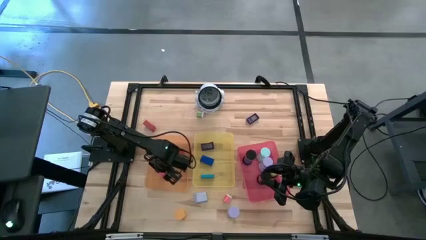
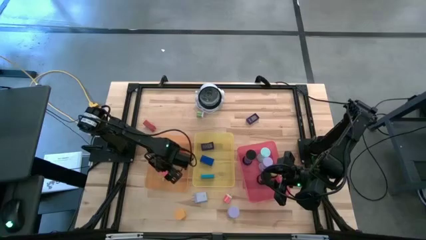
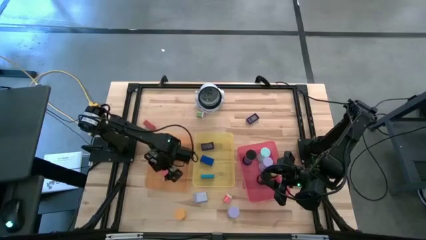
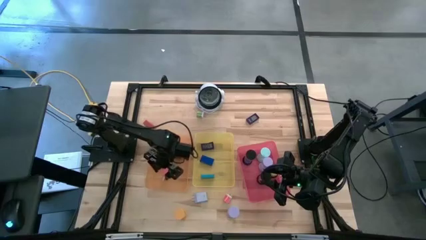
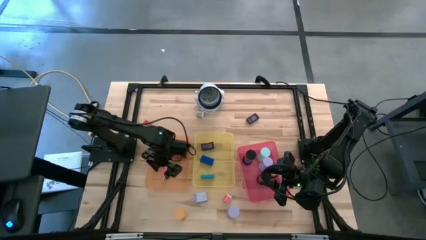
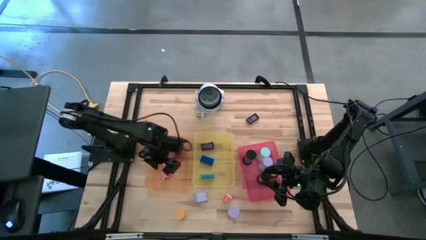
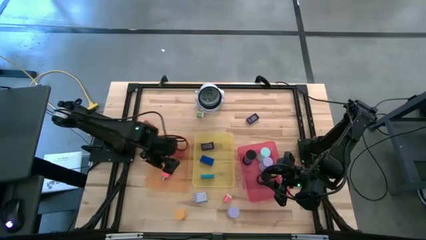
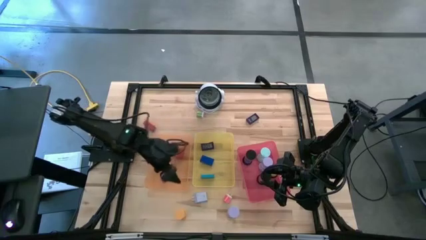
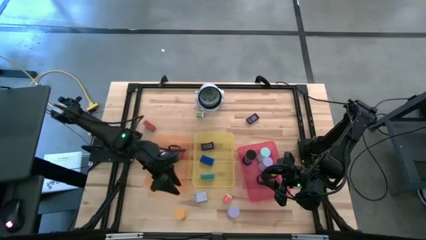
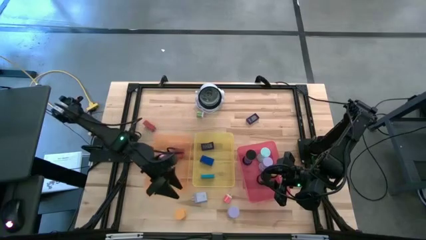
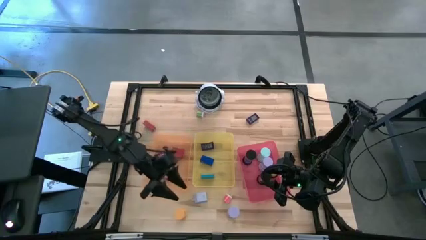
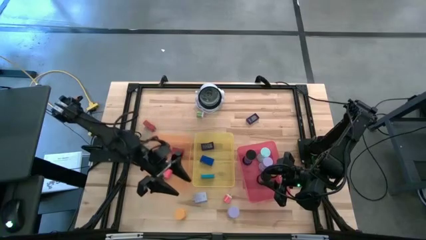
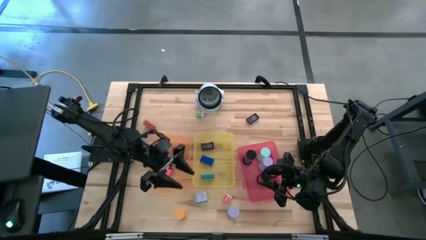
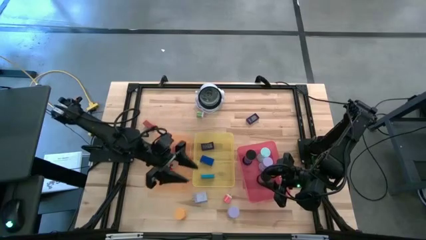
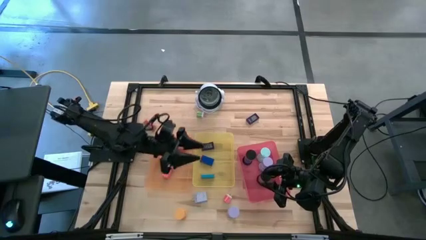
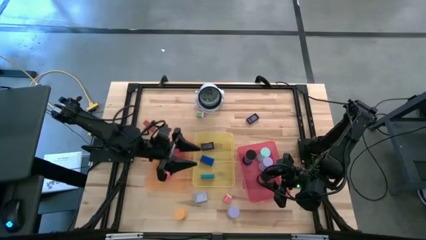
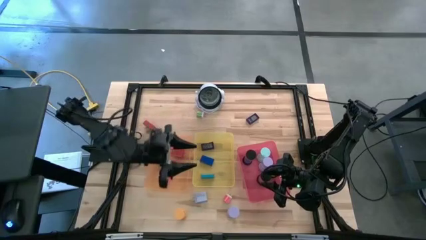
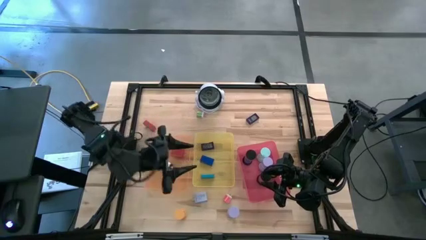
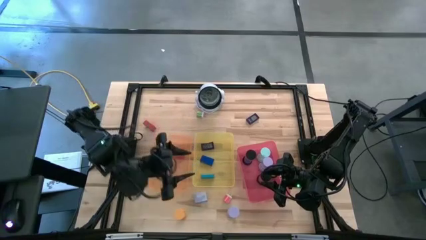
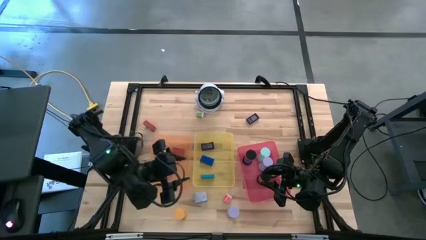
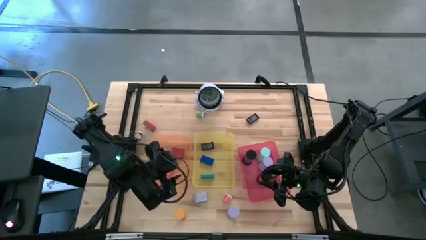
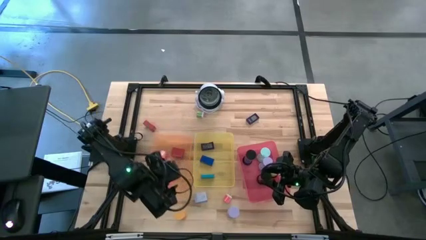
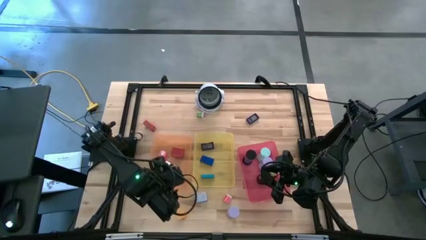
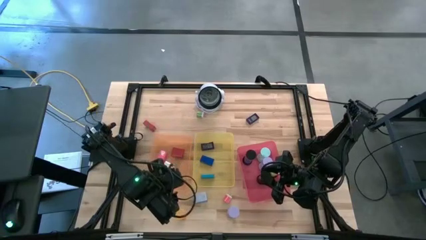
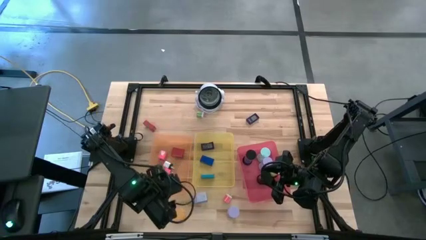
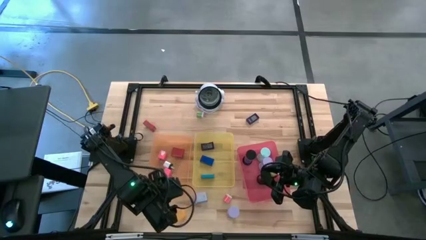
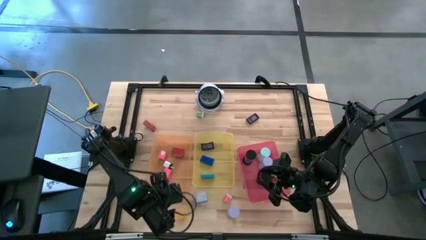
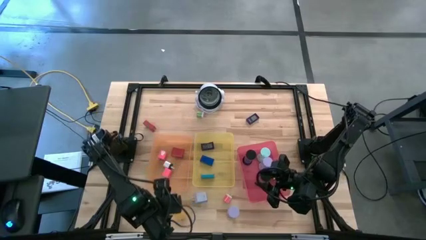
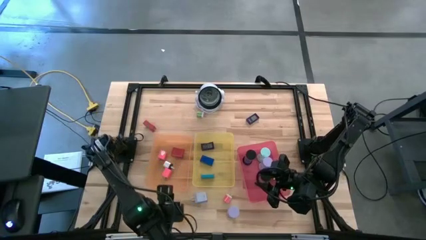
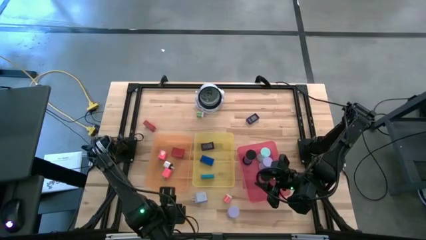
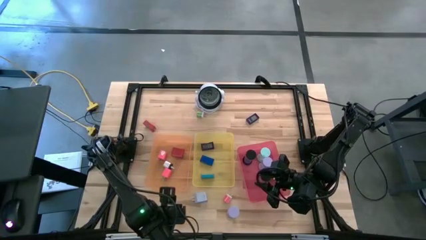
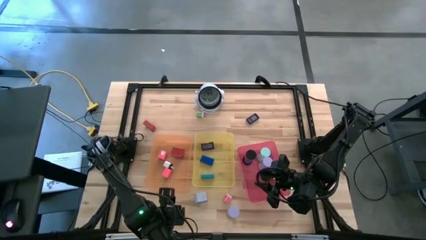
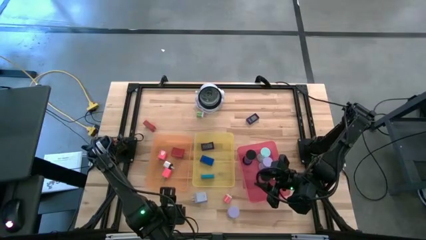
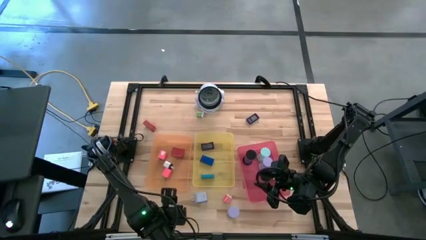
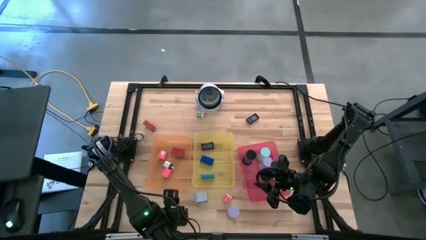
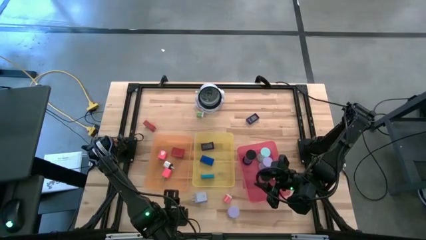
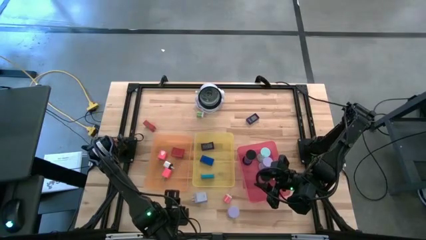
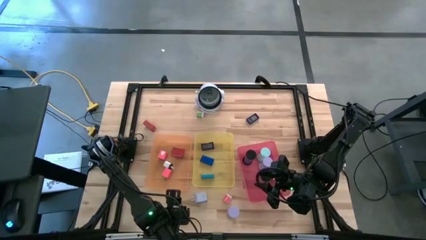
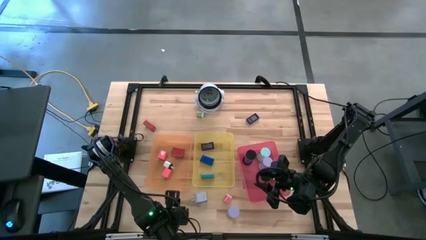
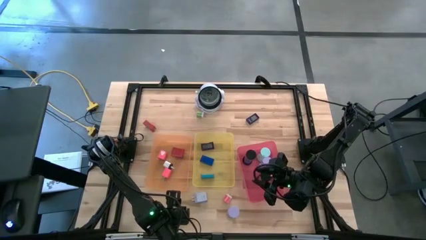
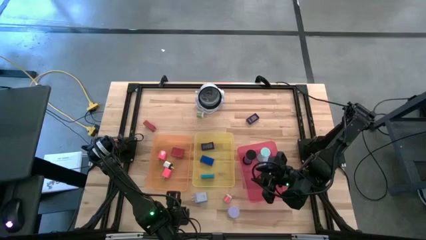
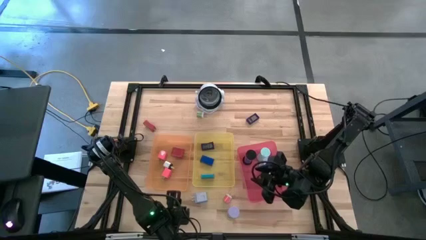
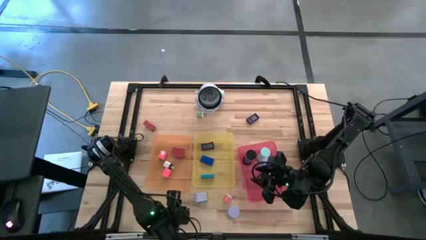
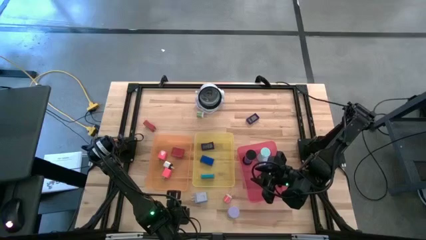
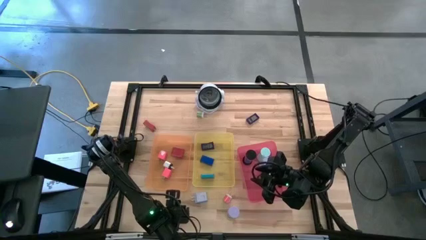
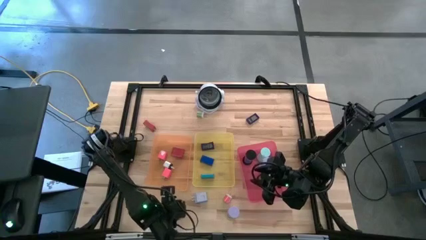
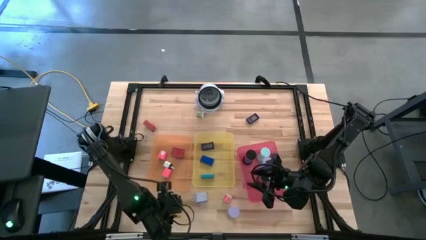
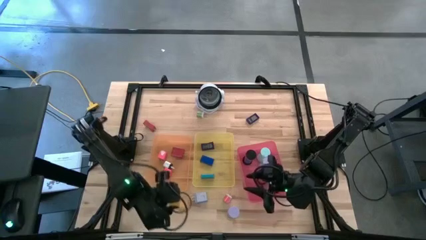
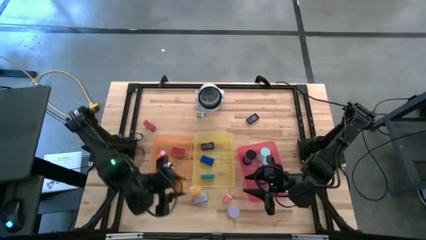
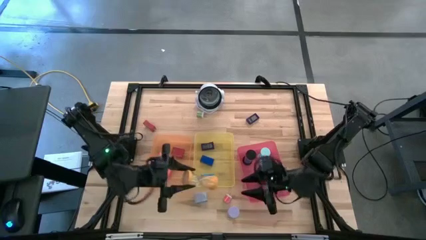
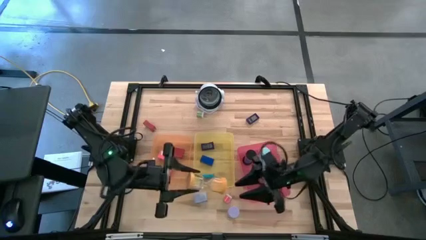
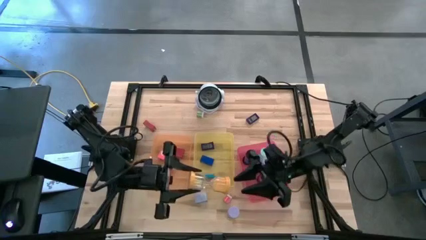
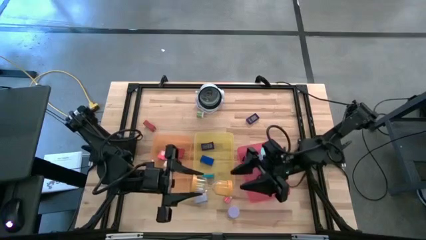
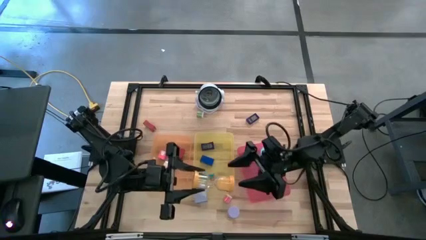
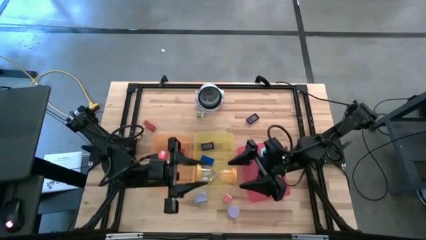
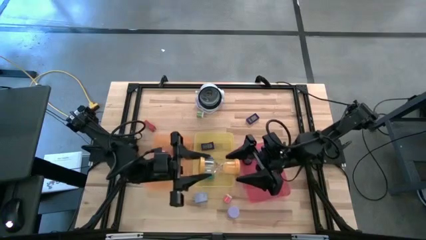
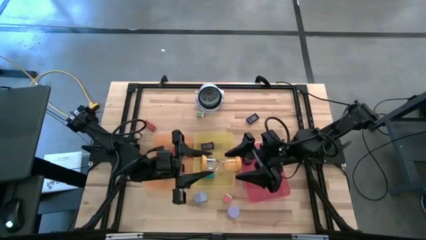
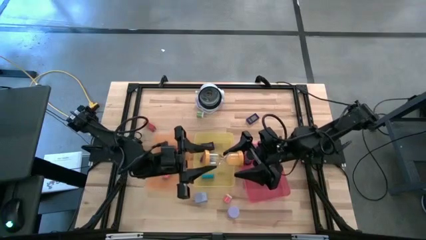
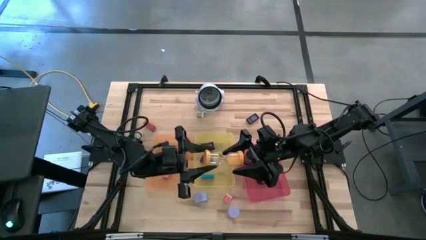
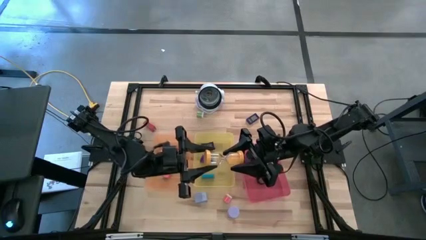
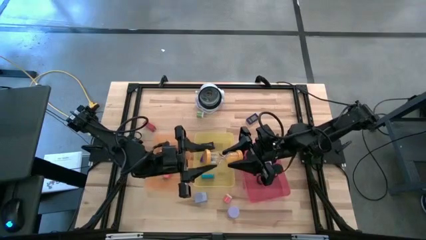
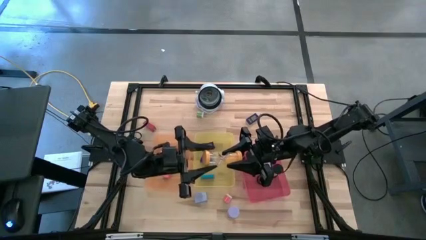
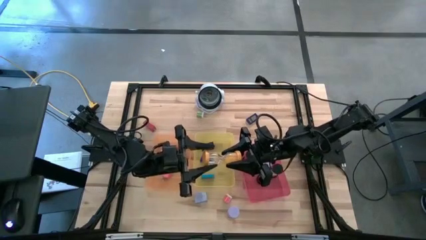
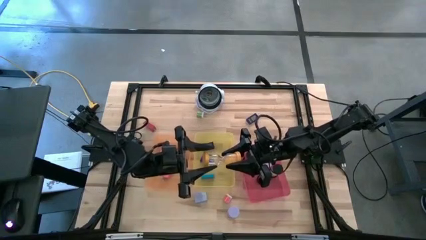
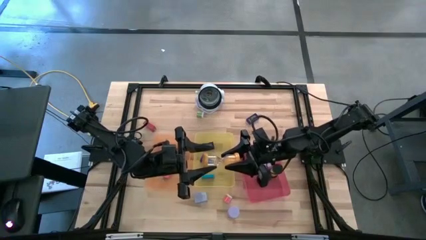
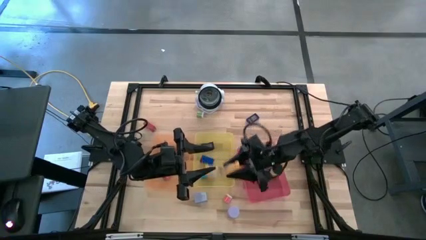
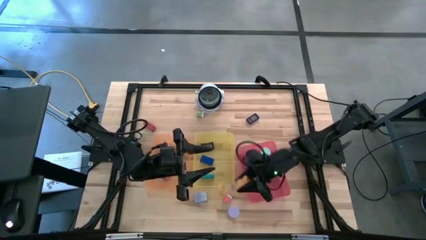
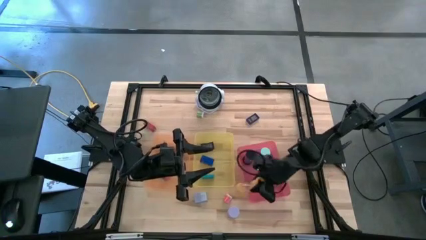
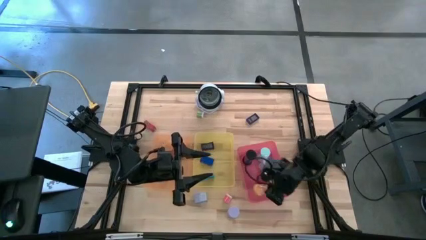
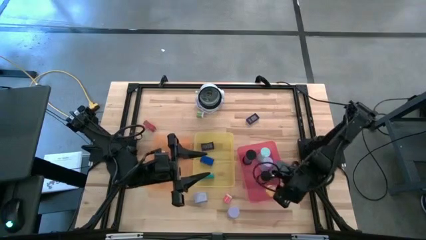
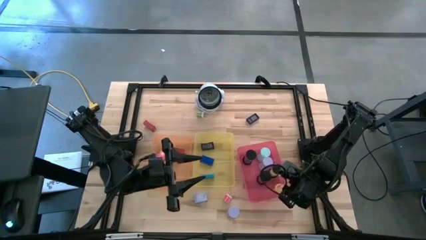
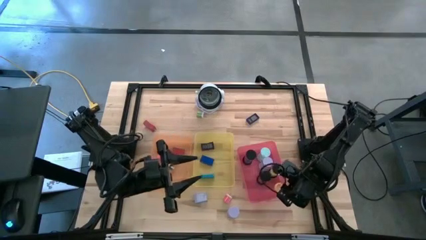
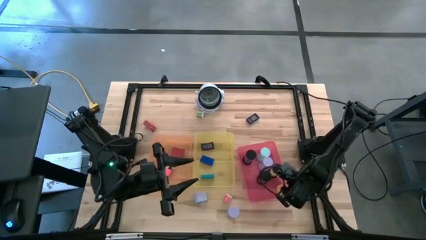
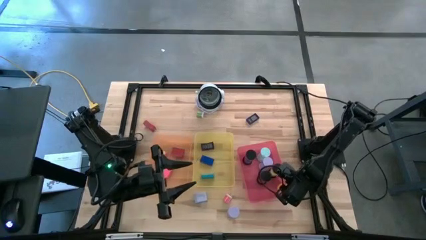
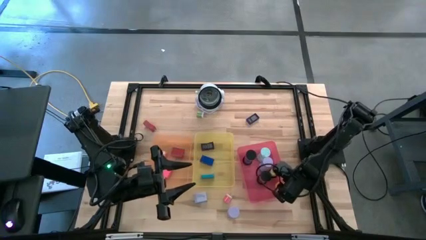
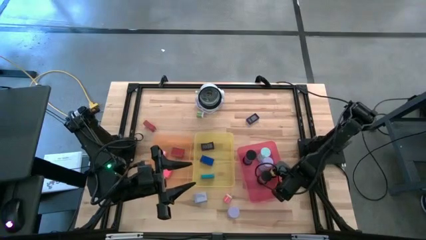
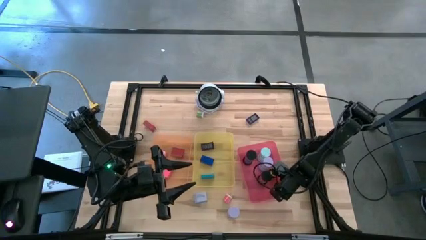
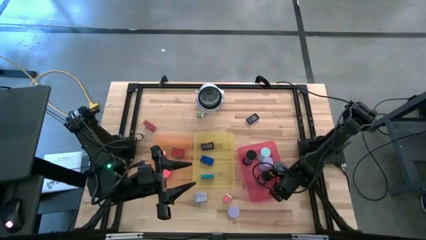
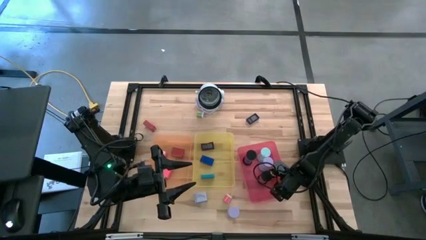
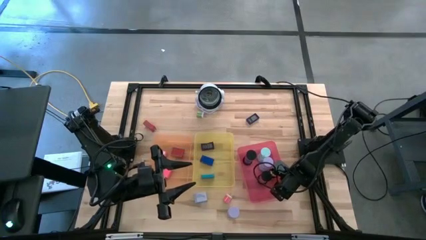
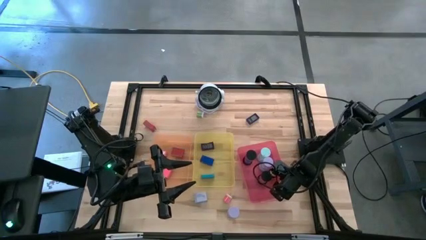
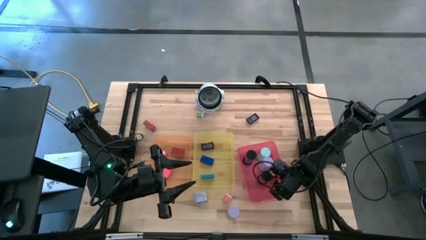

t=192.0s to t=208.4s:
Task: Pick & Place Office items
Put the yellow hourglass timer into the red bin
